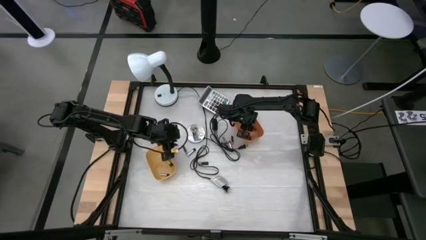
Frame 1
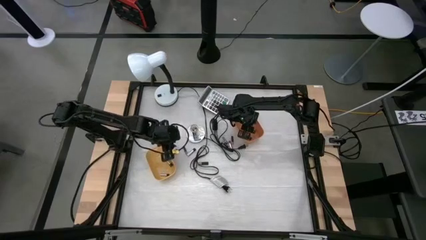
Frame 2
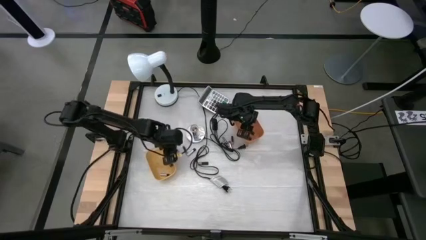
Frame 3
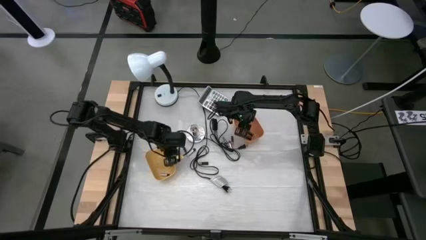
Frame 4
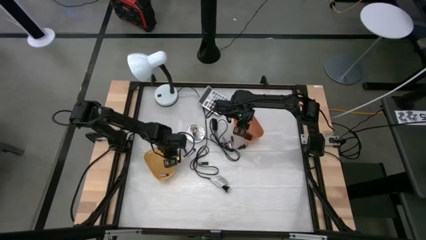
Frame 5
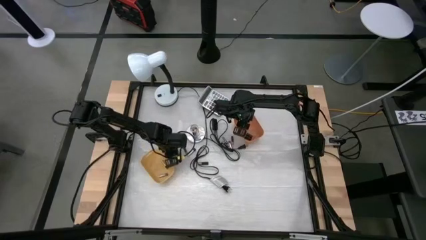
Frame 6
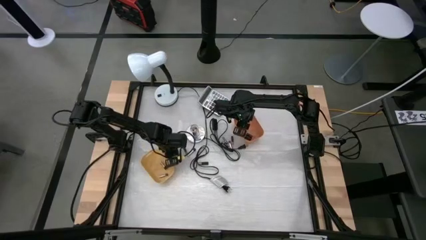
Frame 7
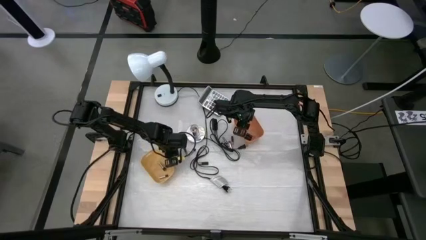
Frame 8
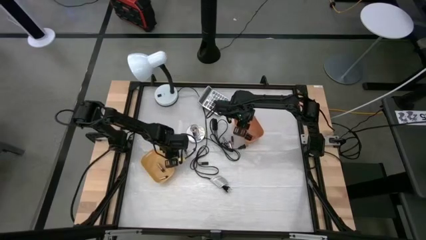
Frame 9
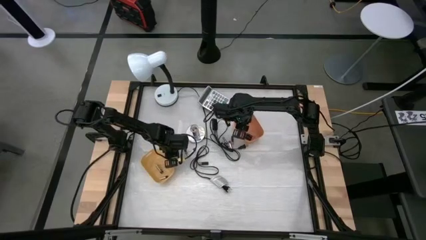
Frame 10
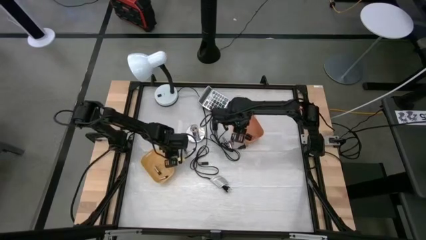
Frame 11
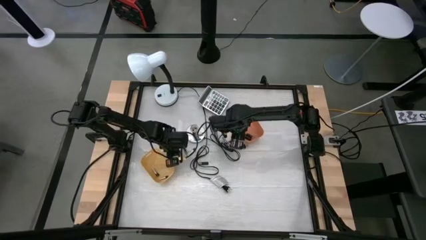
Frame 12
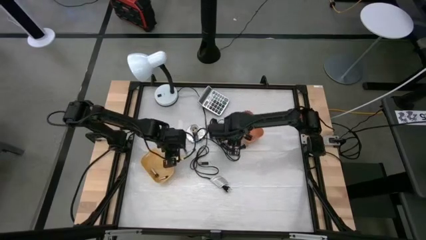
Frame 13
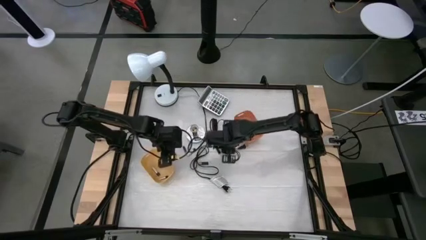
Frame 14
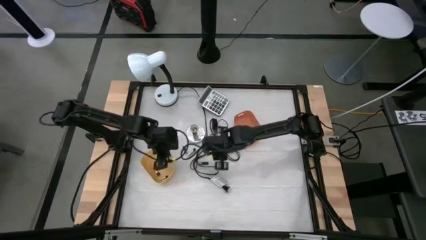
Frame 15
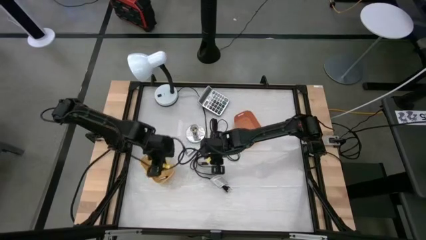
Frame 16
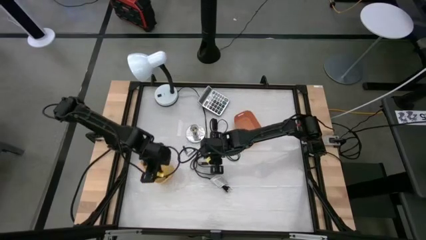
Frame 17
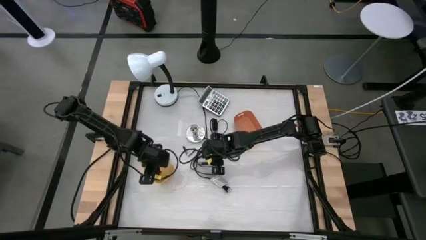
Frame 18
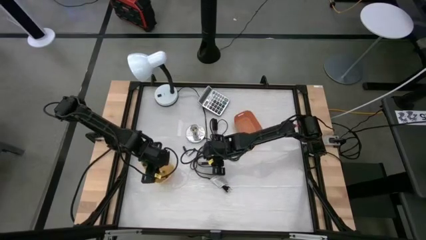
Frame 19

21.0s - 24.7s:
Task: Sort batteries
Put the silver battery into the yellow bin

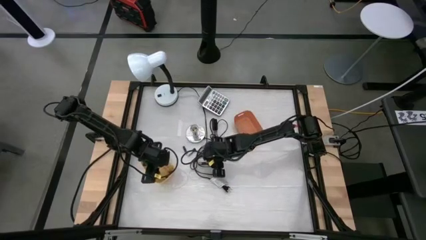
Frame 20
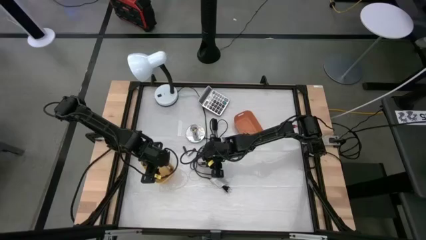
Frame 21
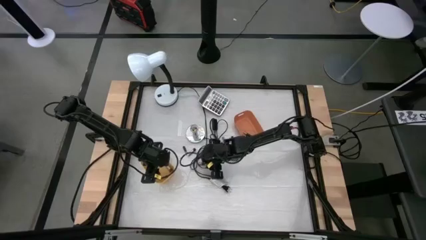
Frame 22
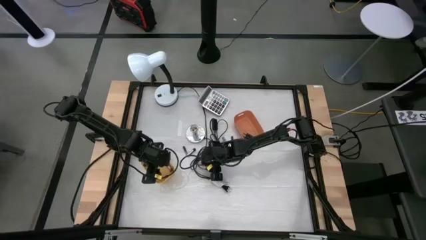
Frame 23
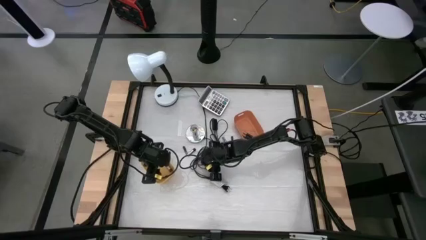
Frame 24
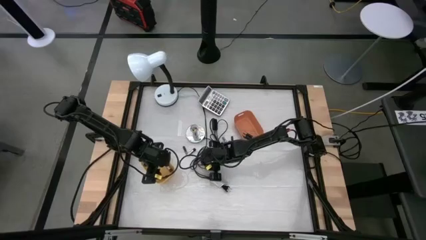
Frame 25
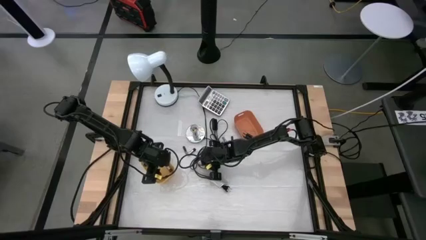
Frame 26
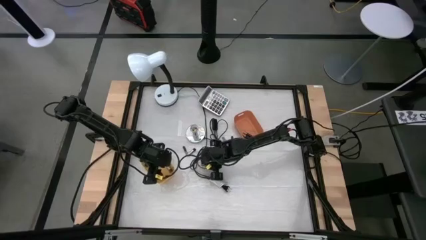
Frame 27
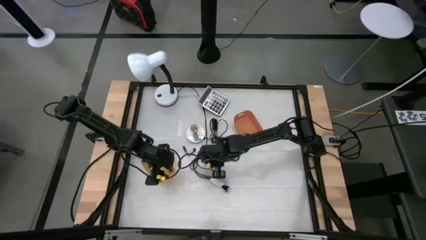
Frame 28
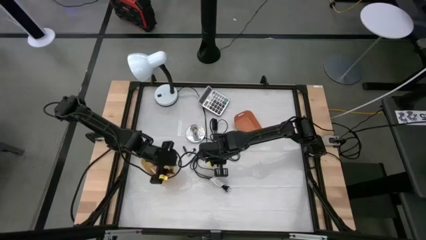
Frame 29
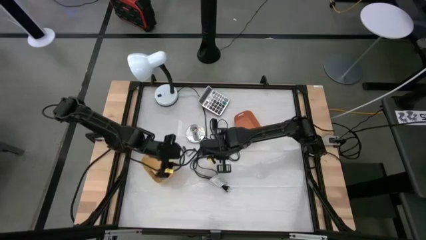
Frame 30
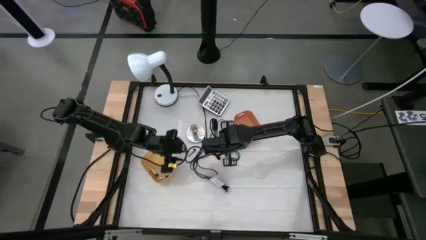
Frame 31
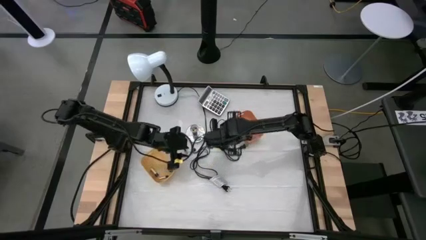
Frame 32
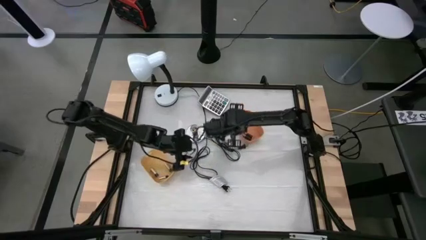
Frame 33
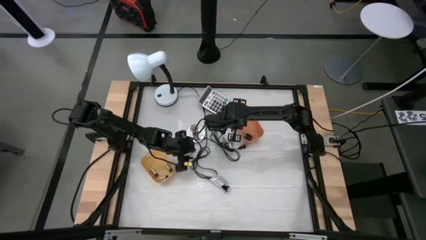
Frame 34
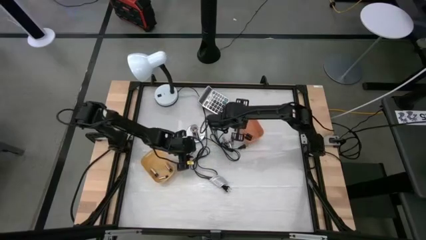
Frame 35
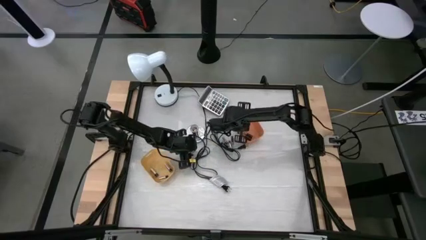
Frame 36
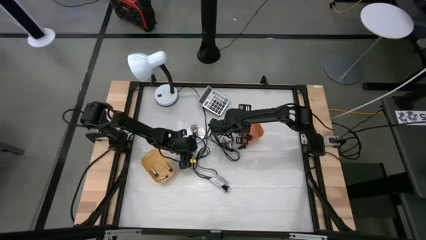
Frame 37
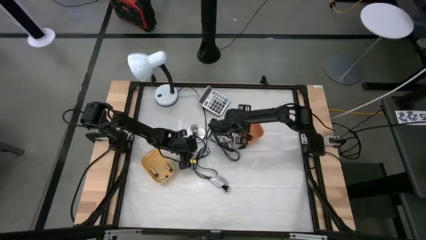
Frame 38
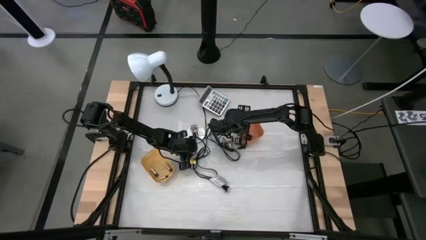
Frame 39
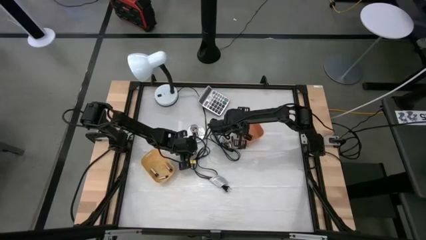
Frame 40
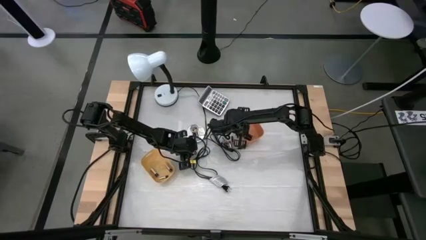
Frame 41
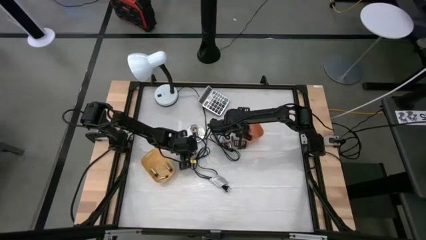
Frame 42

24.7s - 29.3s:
Put the brown battery into the orange bin

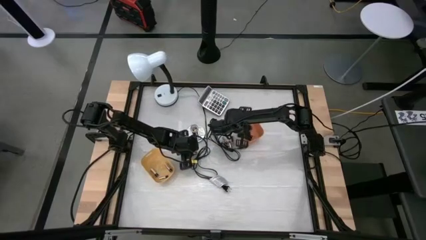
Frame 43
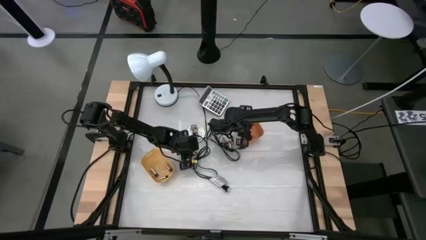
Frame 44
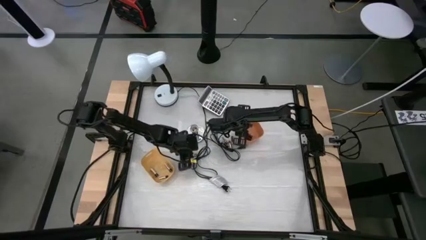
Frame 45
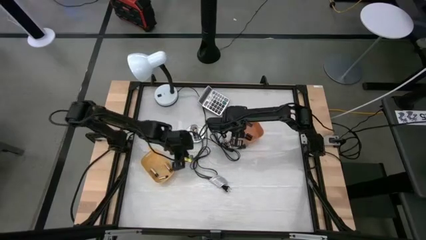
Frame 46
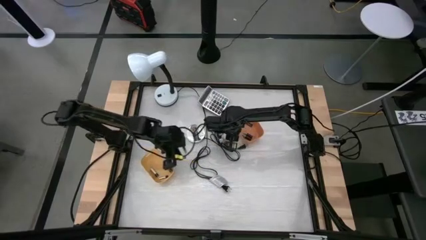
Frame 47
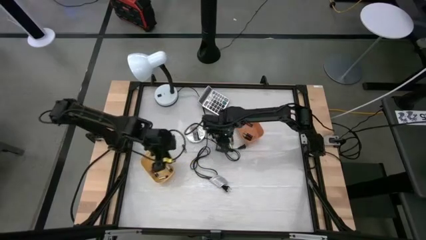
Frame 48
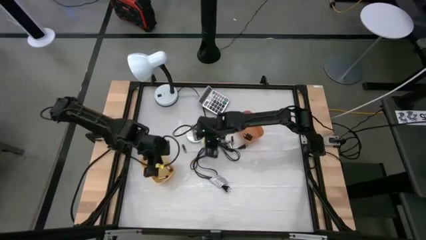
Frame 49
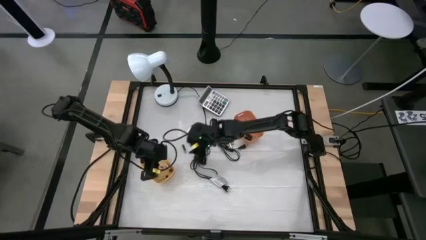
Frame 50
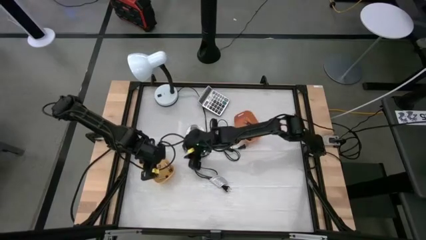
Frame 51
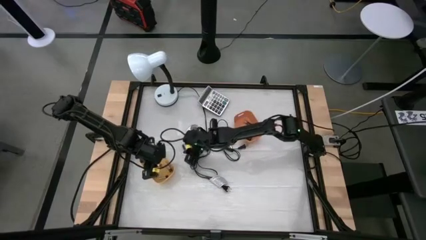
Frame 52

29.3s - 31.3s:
Put the silver battery into the yellow bin

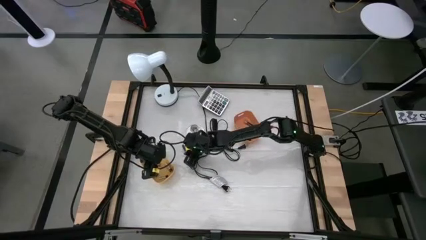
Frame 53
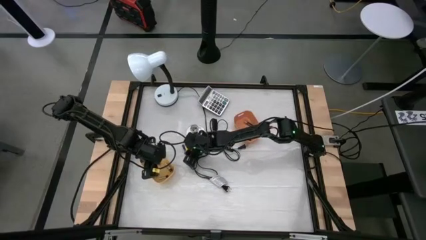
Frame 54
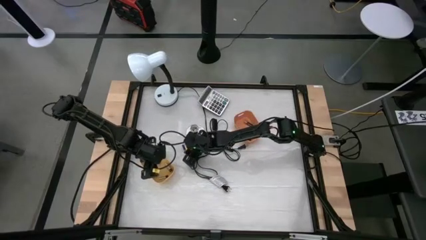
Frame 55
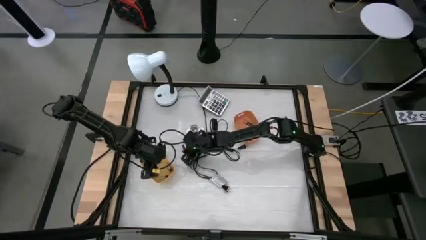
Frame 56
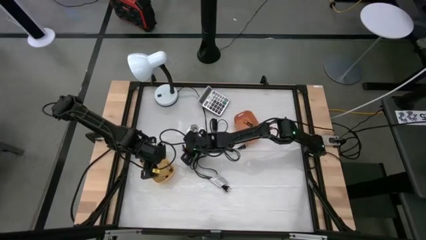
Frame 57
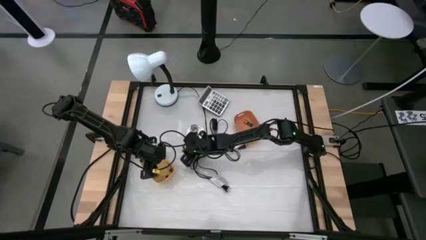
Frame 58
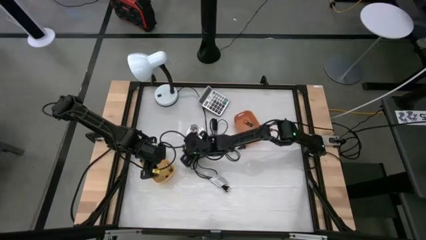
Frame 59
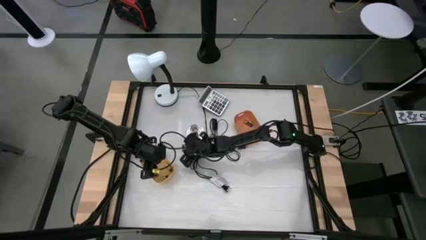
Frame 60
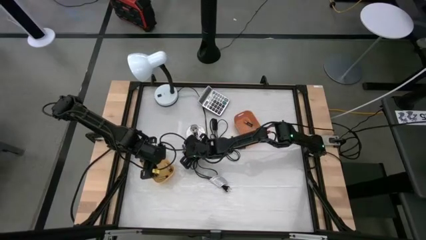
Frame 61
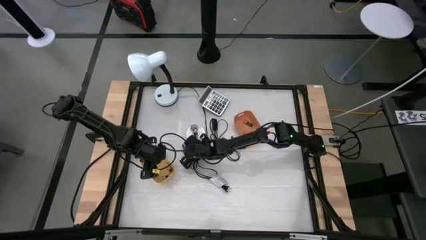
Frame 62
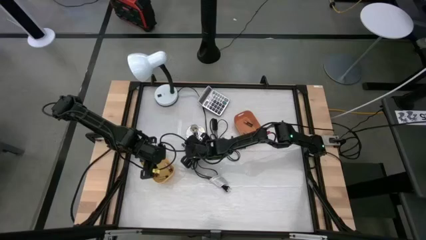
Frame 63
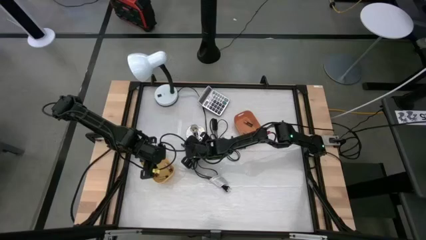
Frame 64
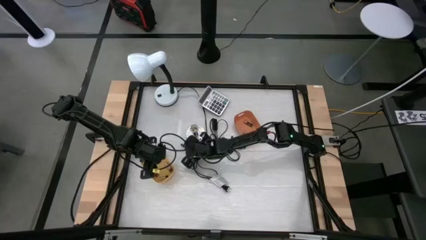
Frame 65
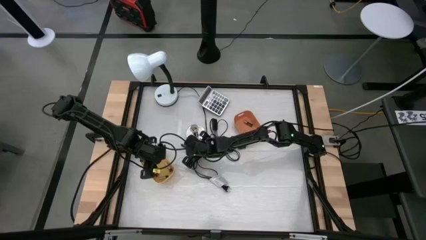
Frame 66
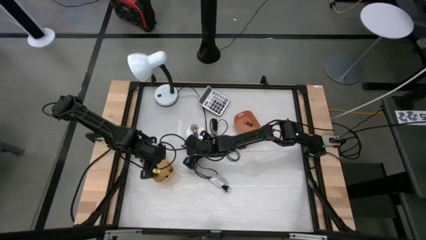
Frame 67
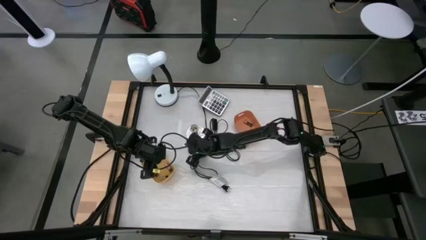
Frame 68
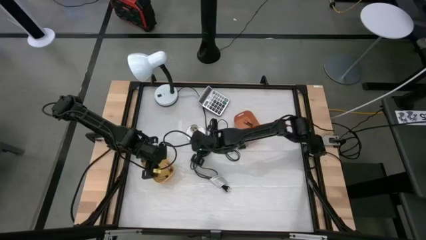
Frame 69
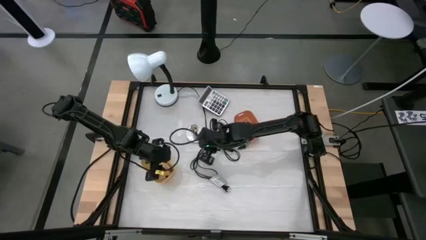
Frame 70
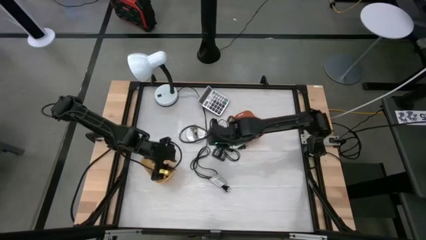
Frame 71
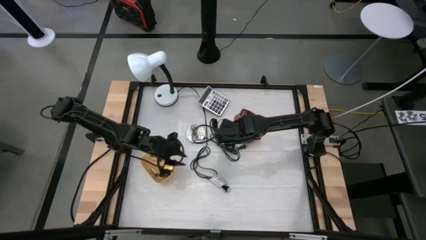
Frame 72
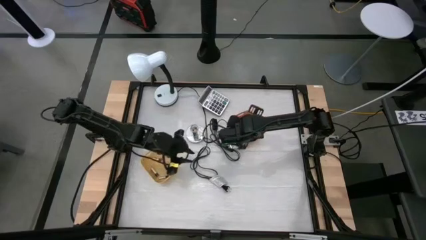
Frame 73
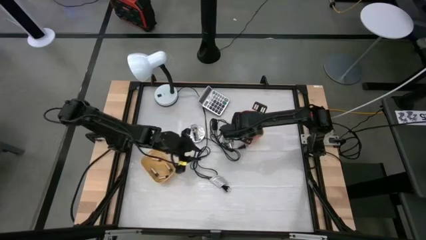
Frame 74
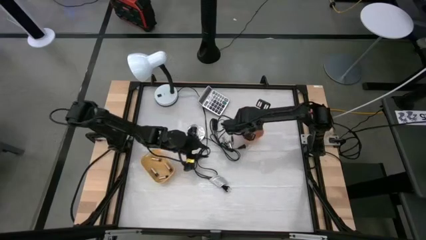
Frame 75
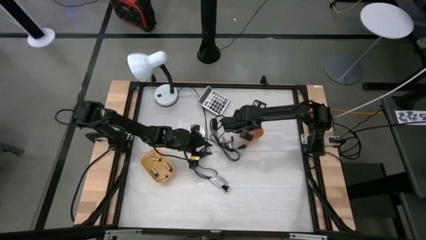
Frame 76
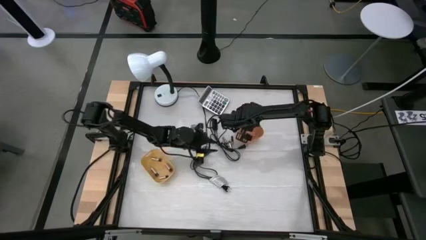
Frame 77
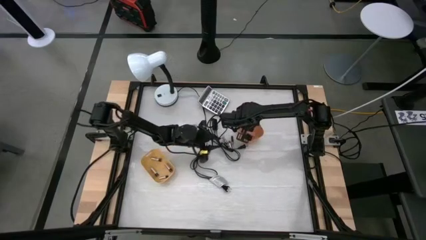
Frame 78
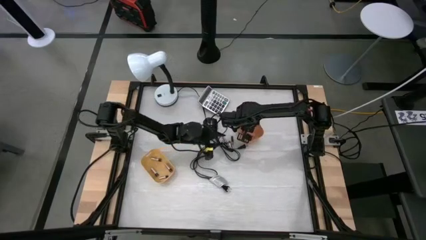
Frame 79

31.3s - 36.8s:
Put the brown battery into the orange bin

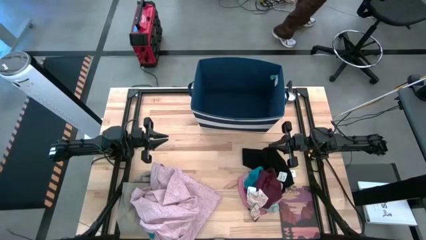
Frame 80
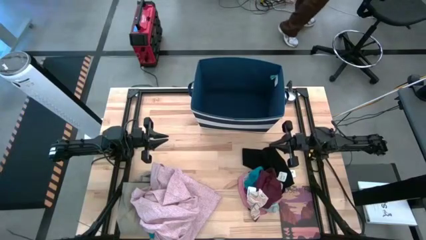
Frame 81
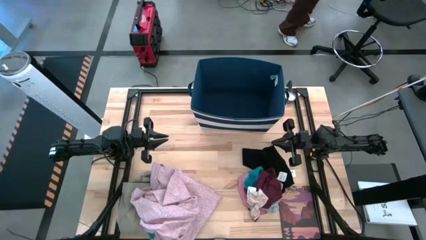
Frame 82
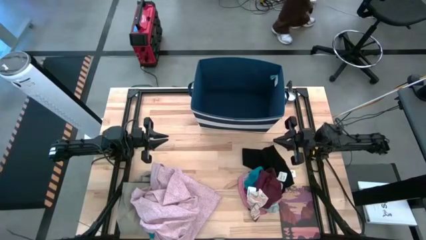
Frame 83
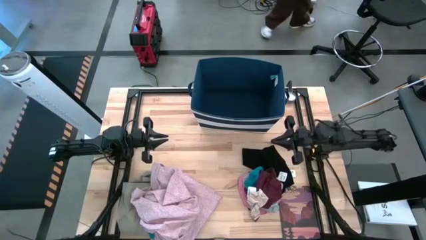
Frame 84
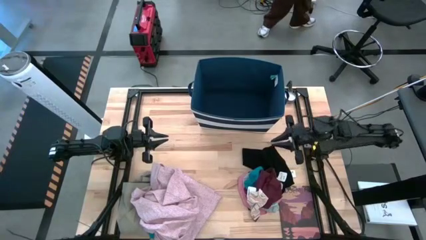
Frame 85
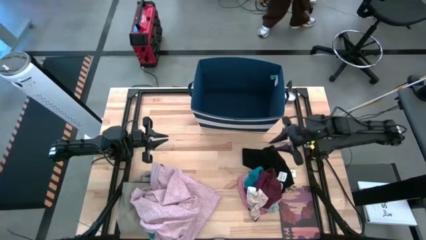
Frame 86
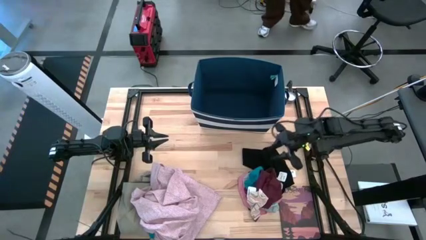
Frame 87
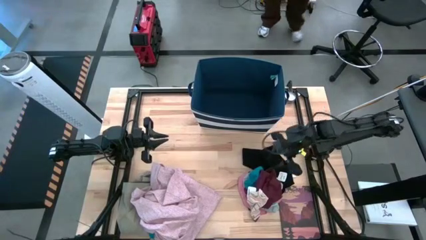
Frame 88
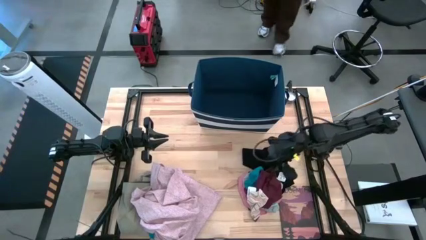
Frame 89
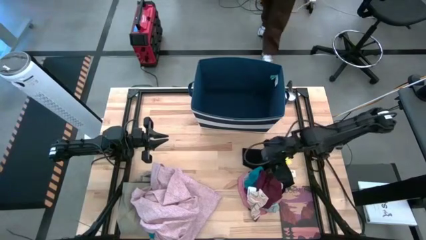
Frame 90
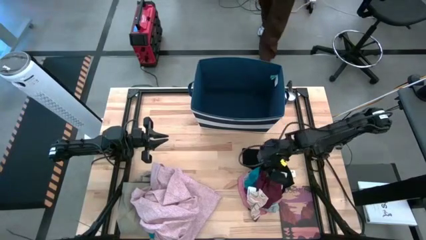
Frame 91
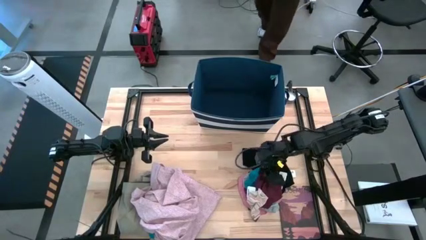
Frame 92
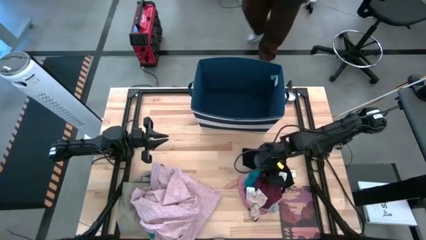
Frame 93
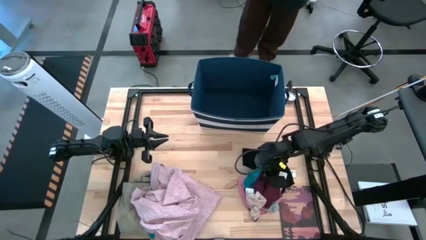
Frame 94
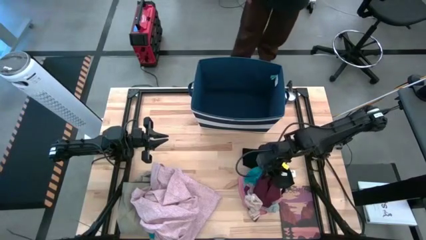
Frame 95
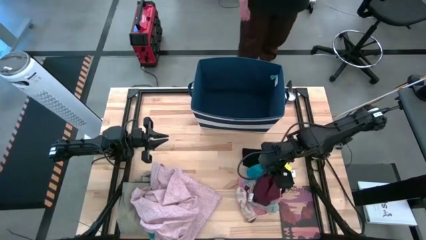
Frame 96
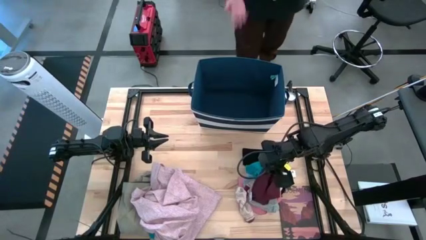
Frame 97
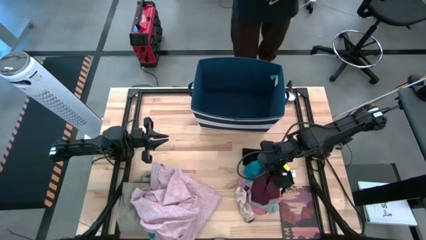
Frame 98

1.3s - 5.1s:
Task: Sort clothes
Put the red boxers into the blue laundry bin
